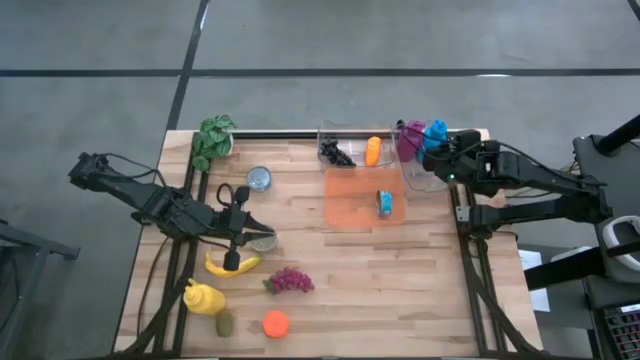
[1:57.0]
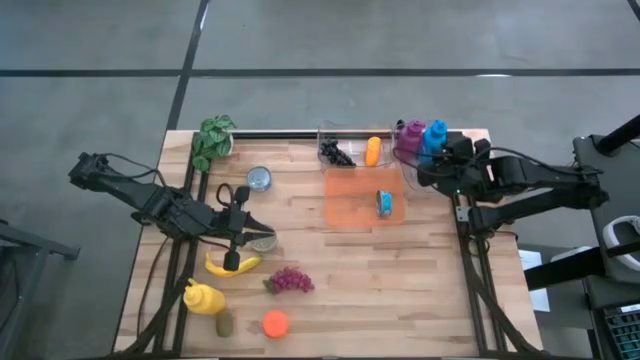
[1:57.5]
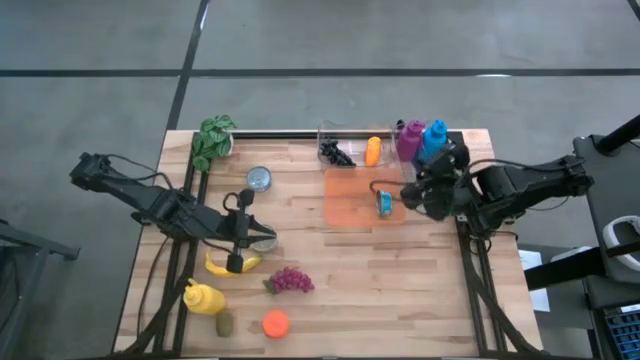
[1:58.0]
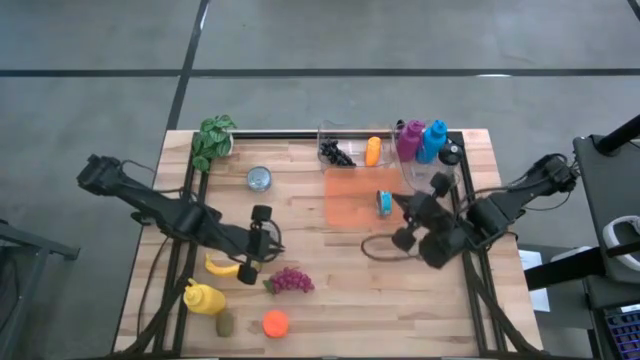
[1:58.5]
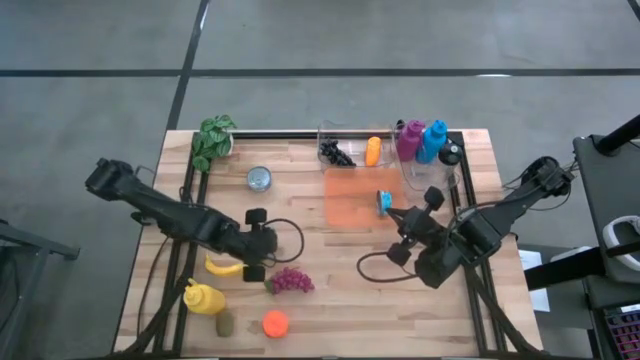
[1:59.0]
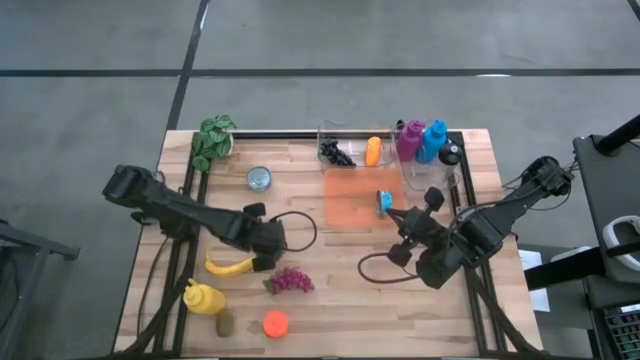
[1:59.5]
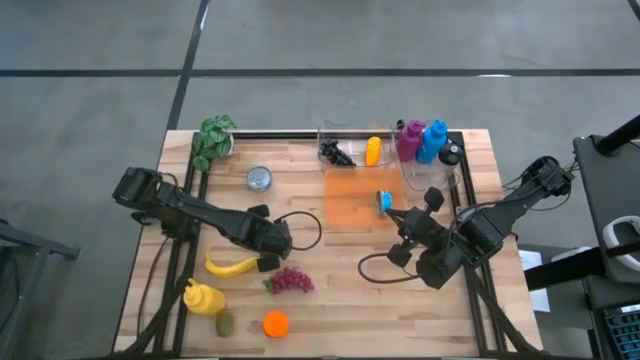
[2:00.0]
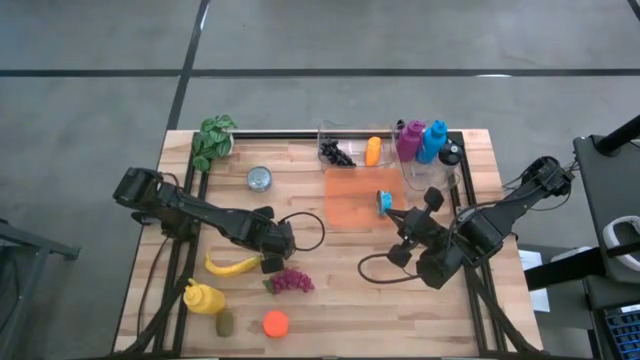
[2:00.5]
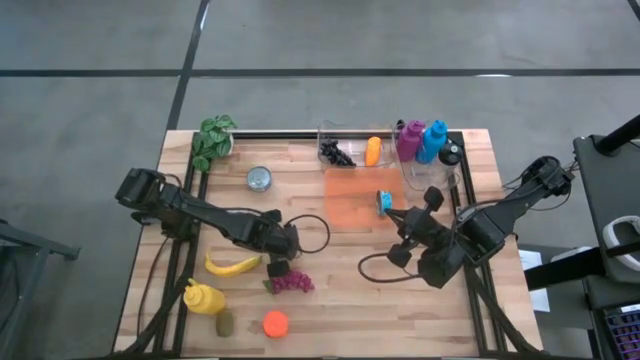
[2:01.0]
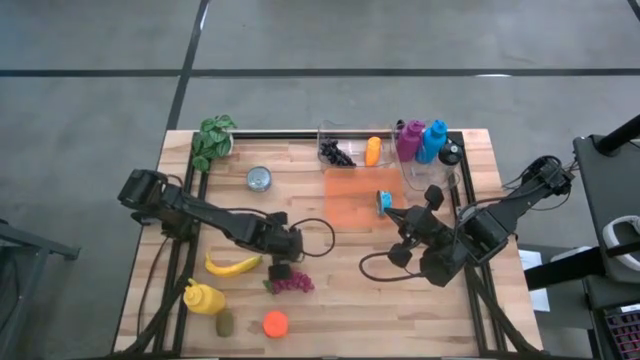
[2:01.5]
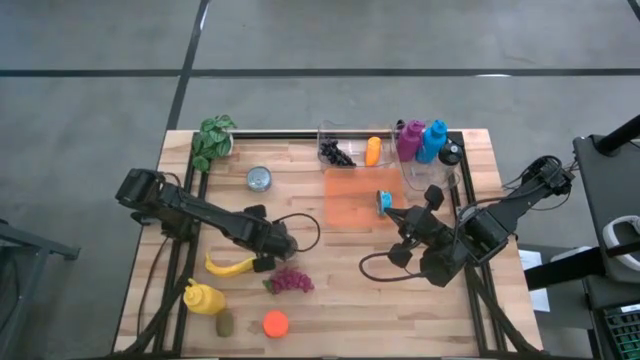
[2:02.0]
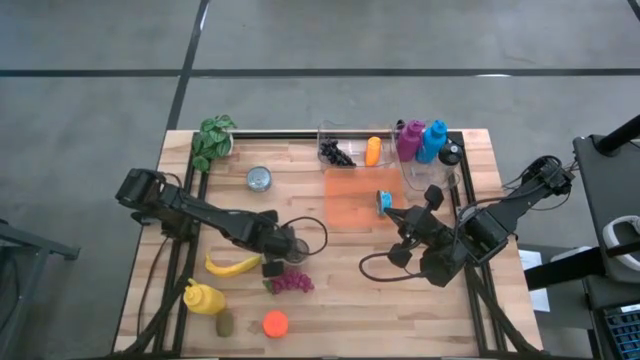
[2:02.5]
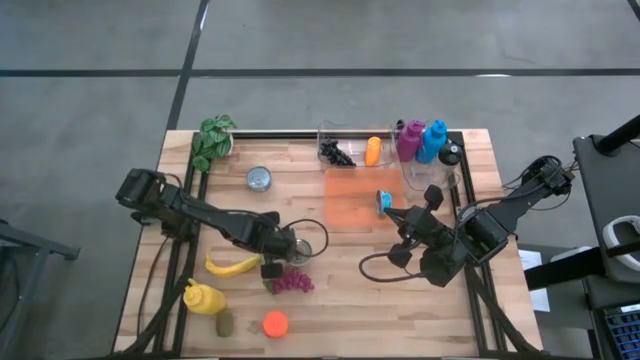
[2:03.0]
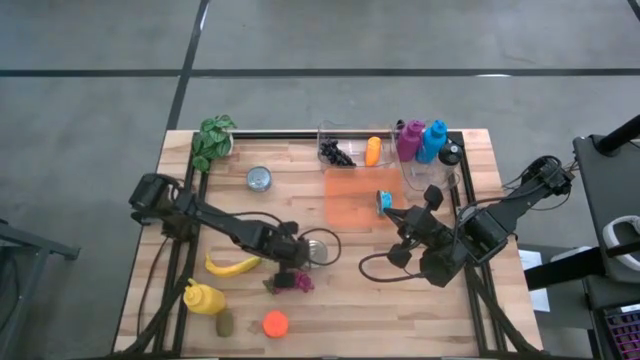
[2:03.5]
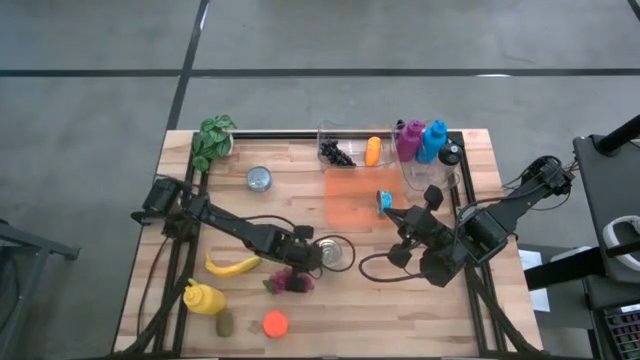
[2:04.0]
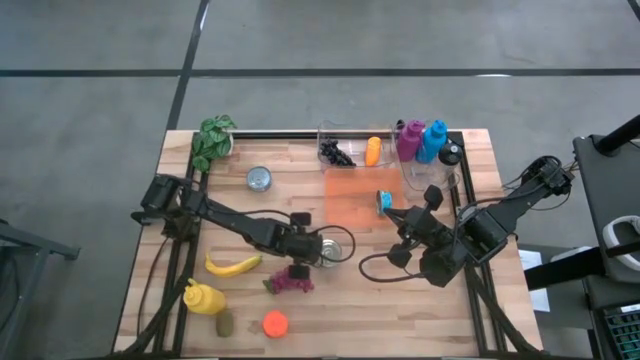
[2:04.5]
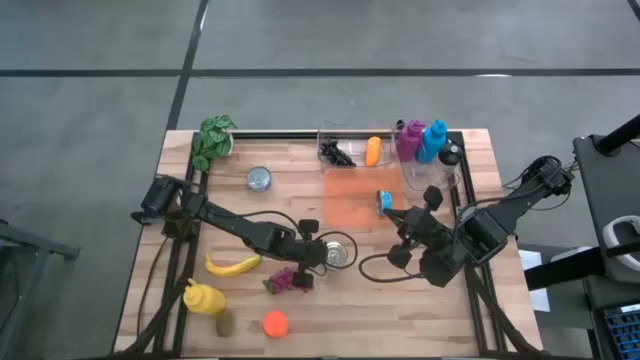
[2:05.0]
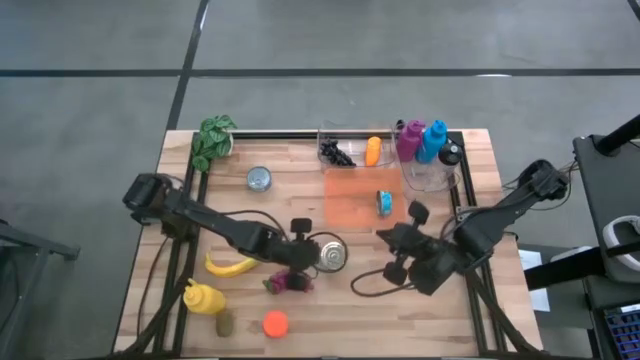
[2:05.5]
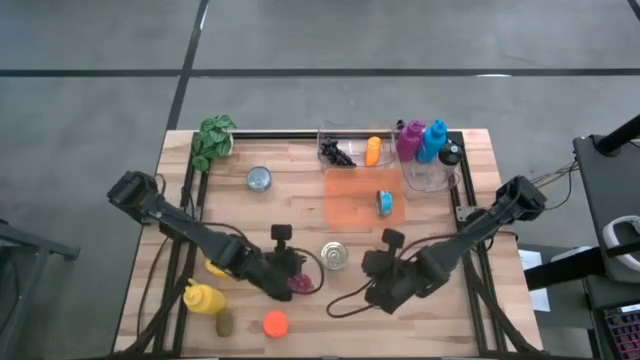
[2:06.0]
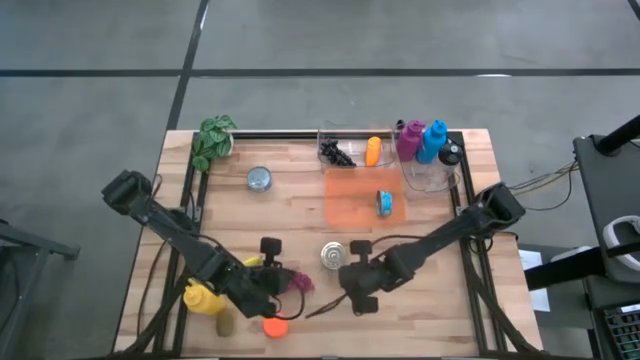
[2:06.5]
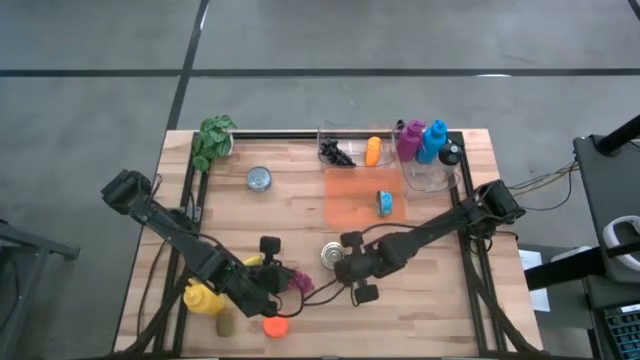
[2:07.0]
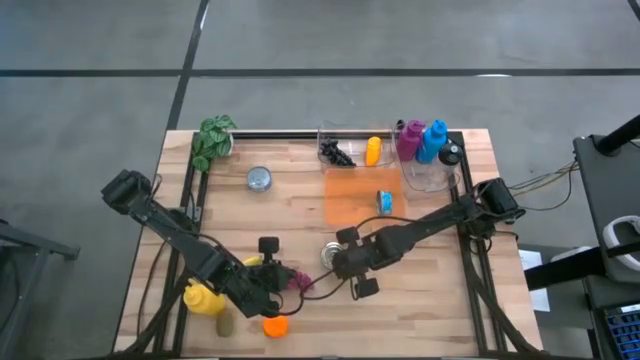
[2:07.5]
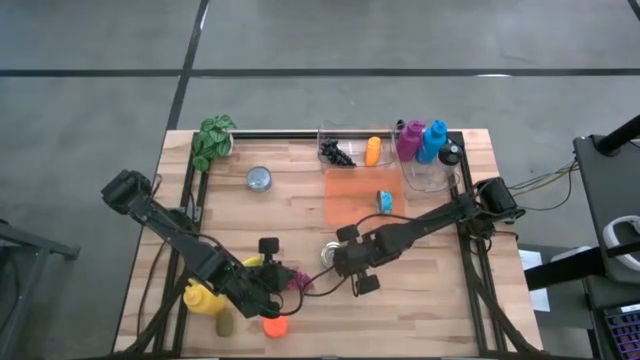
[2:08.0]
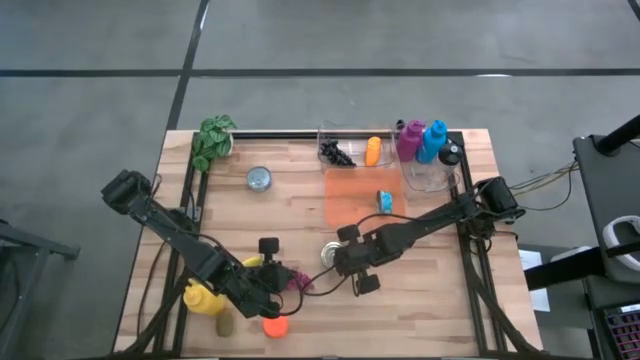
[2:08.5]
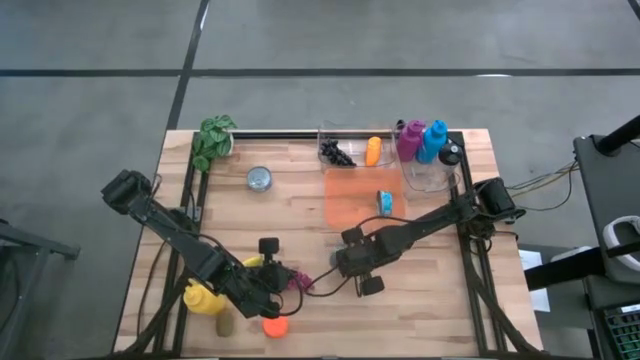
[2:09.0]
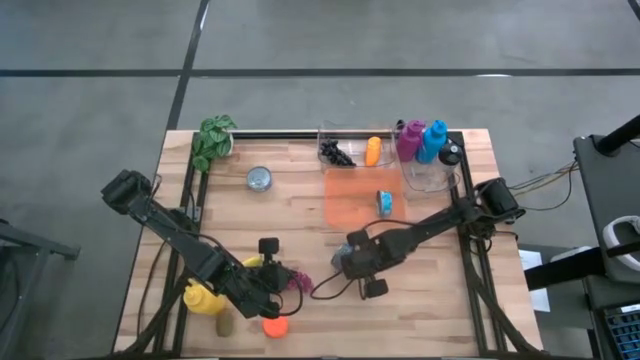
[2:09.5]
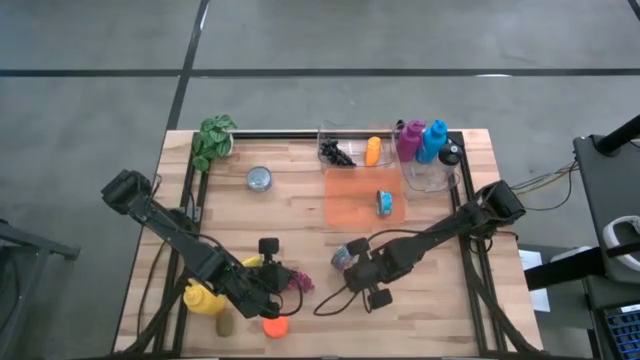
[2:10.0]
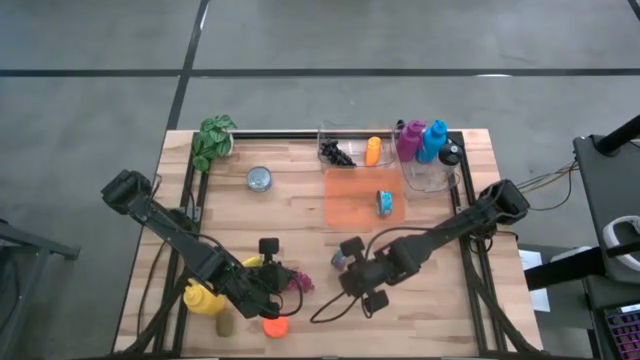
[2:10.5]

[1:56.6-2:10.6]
Task: Pick & Place Food Item
Put the blue and pink tuna can into the orange bin

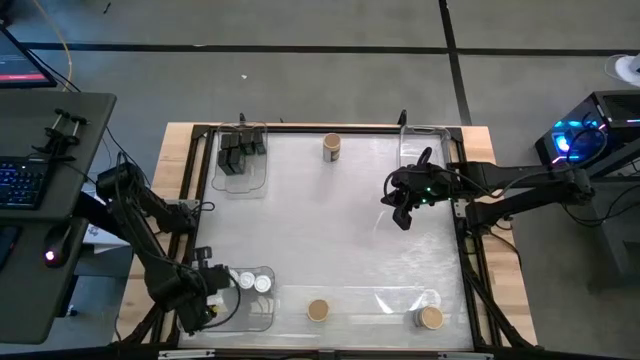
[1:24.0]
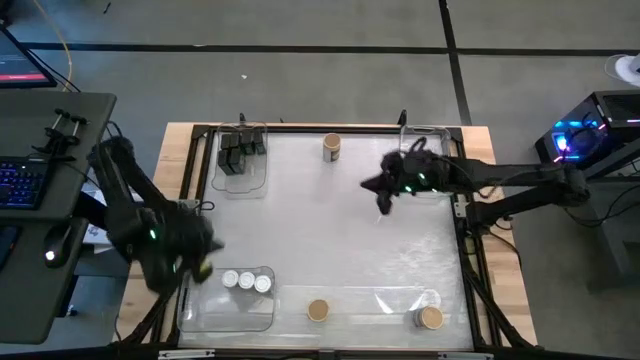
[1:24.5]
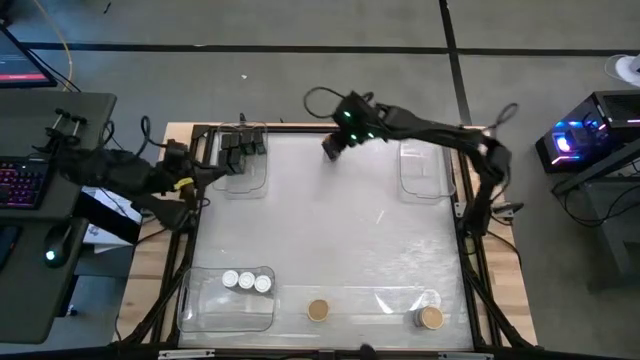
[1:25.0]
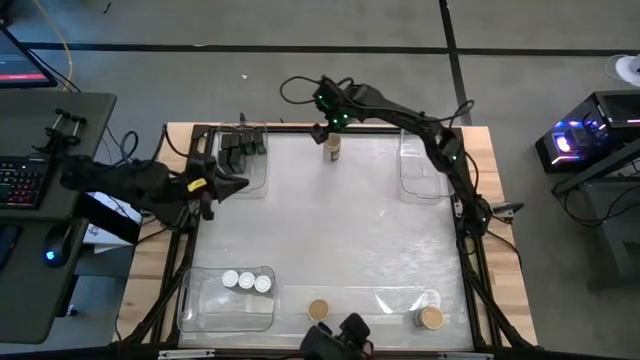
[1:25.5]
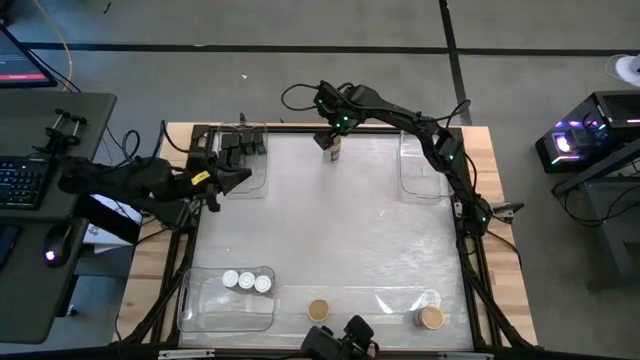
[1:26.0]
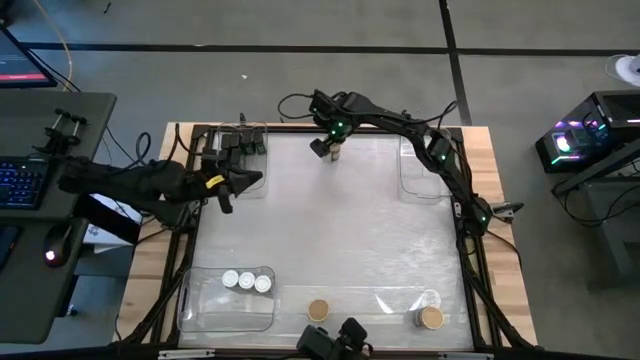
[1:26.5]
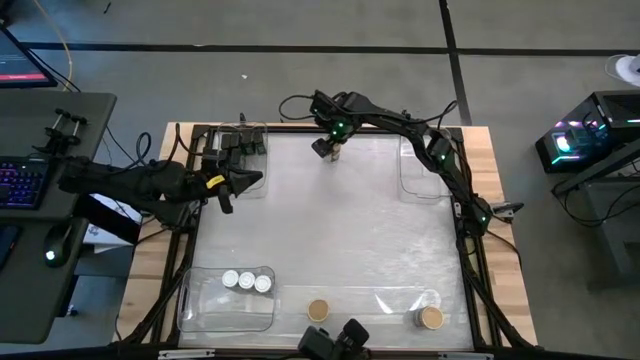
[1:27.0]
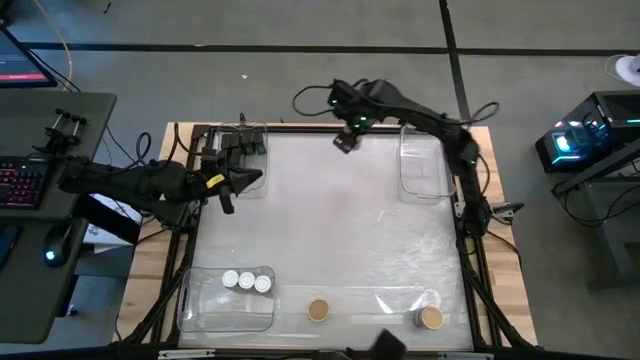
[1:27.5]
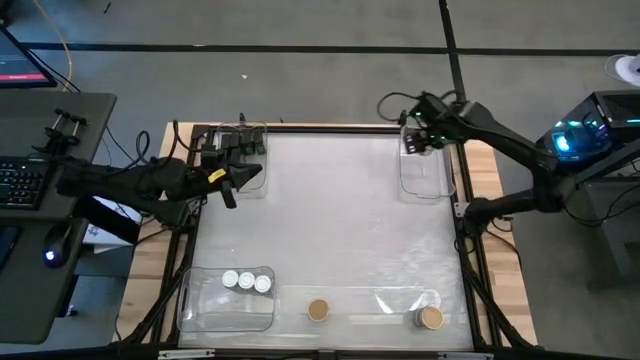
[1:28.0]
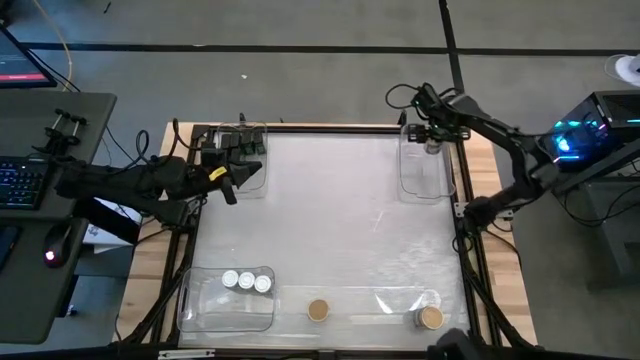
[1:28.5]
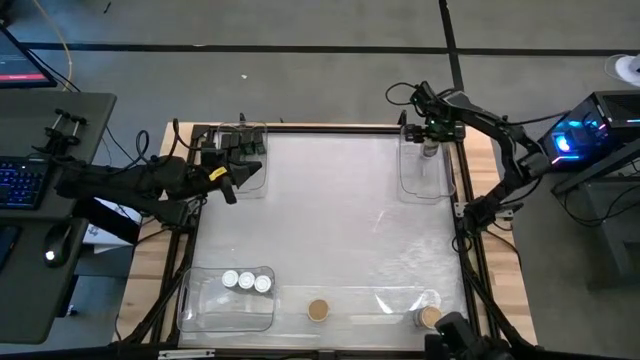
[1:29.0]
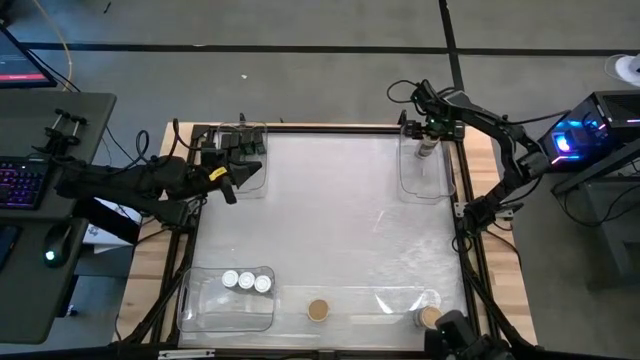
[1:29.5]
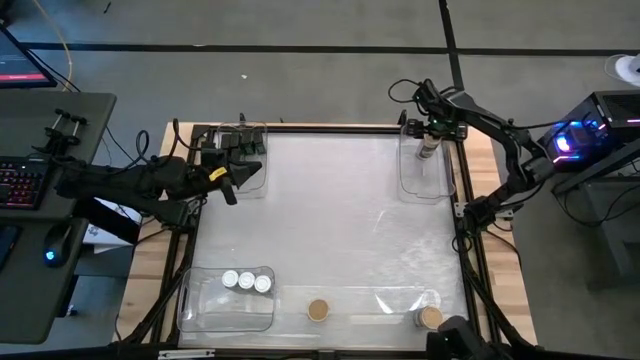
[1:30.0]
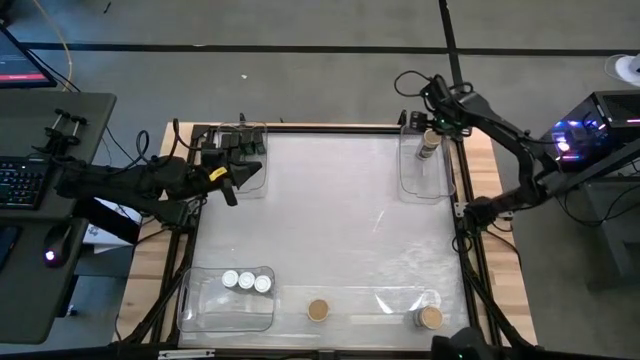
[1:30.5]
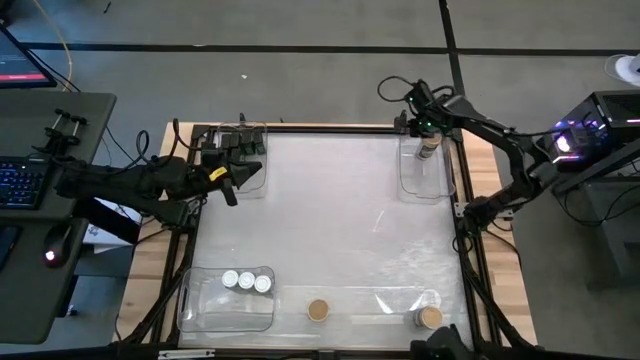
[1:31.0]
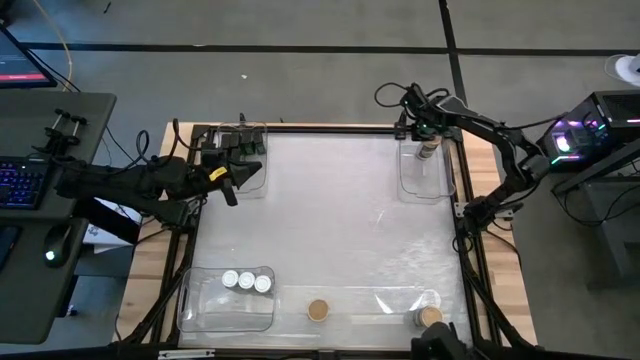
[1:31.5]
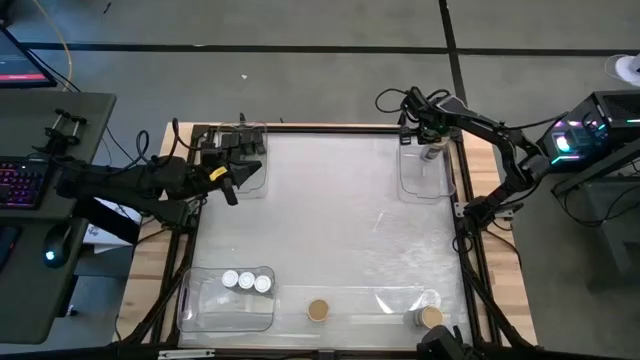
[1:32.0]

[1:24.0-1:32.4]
Task: Sort spices by type
Put the top golden seasoning bottle into the top right transparent bin
